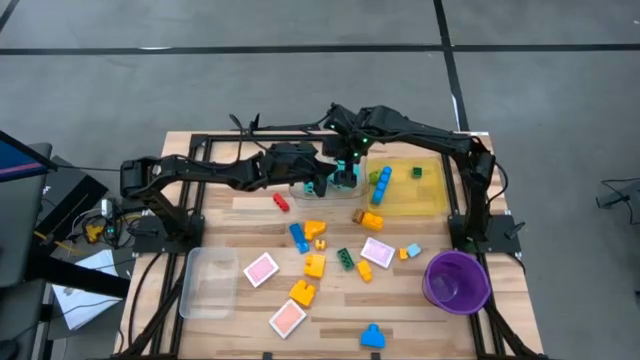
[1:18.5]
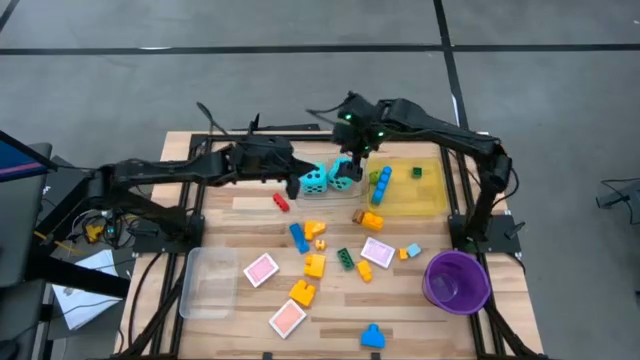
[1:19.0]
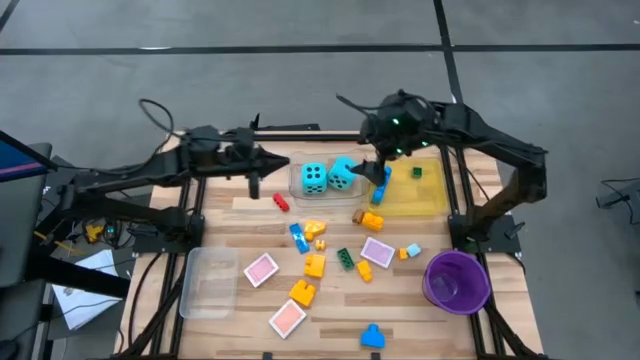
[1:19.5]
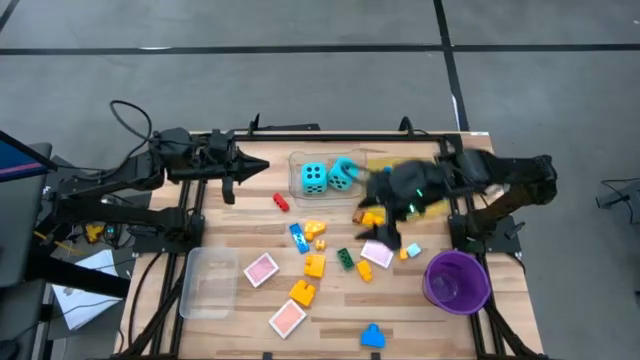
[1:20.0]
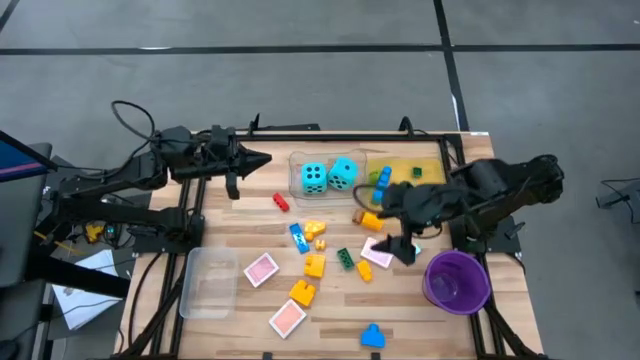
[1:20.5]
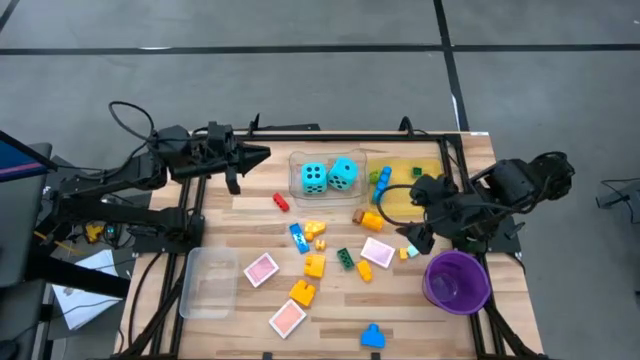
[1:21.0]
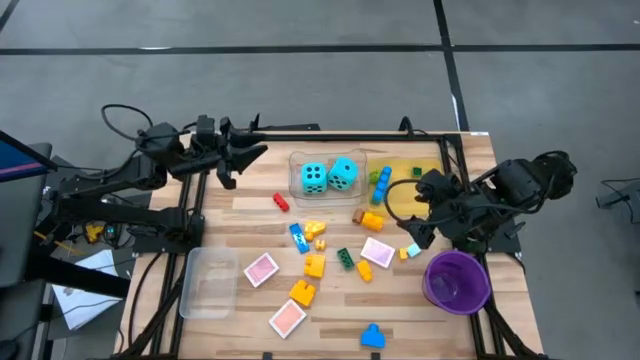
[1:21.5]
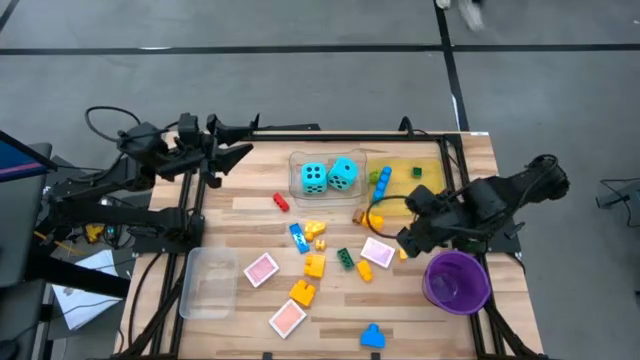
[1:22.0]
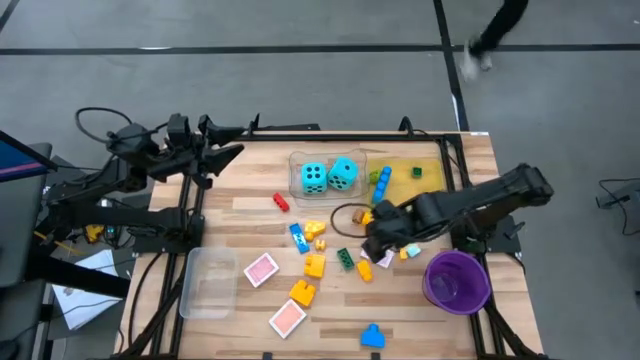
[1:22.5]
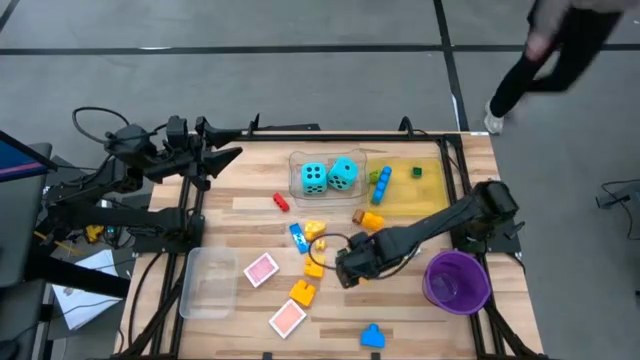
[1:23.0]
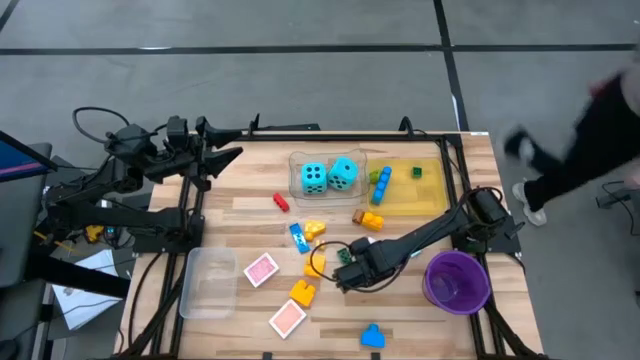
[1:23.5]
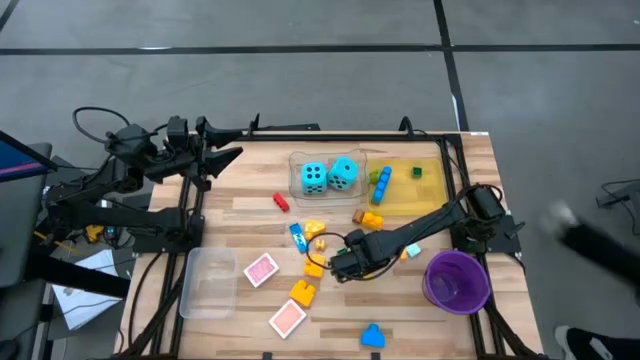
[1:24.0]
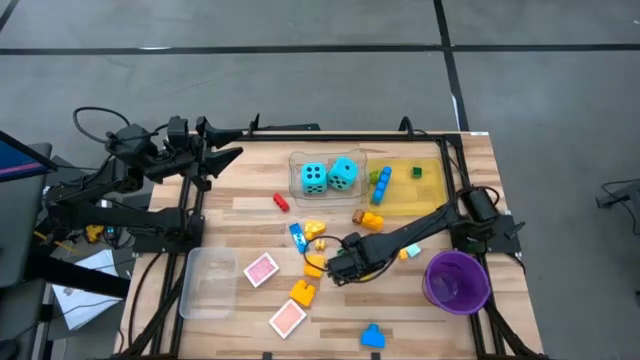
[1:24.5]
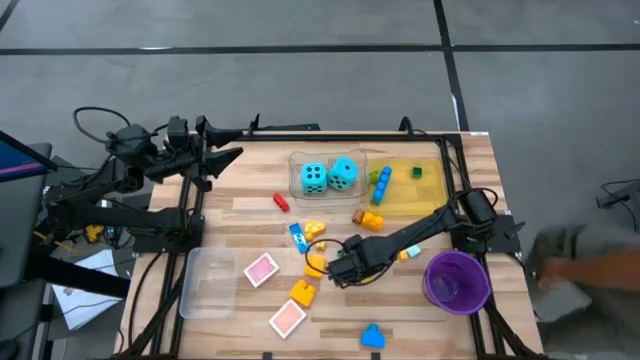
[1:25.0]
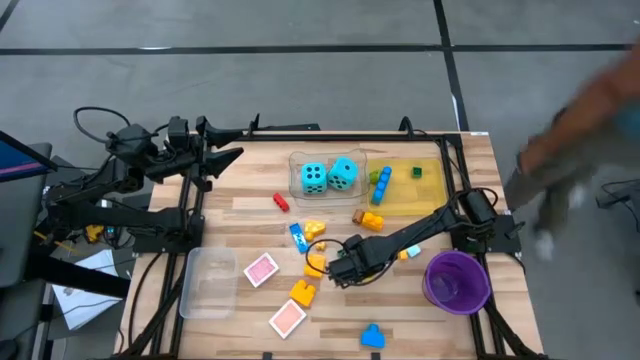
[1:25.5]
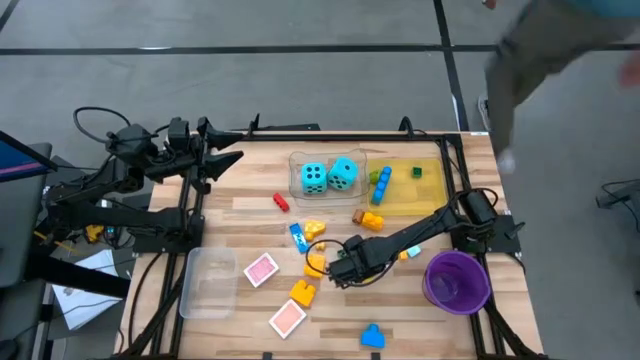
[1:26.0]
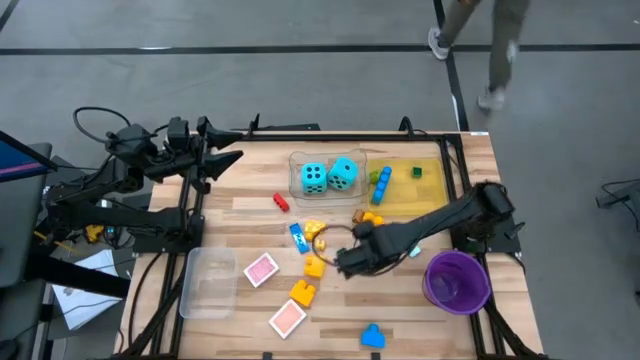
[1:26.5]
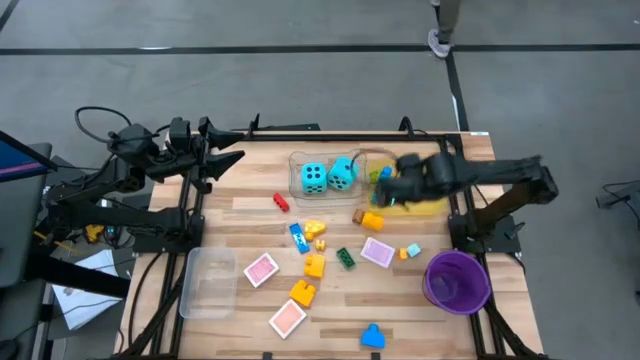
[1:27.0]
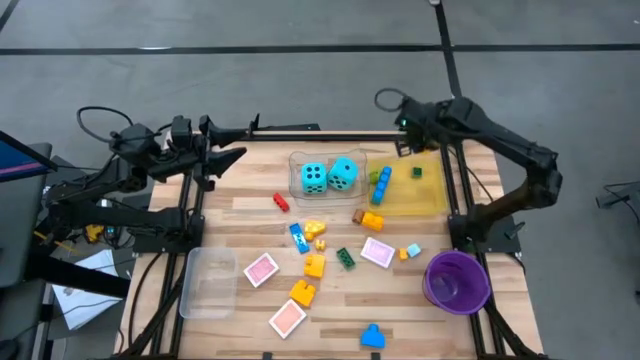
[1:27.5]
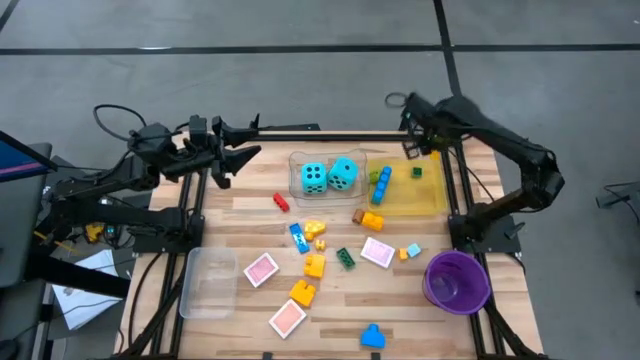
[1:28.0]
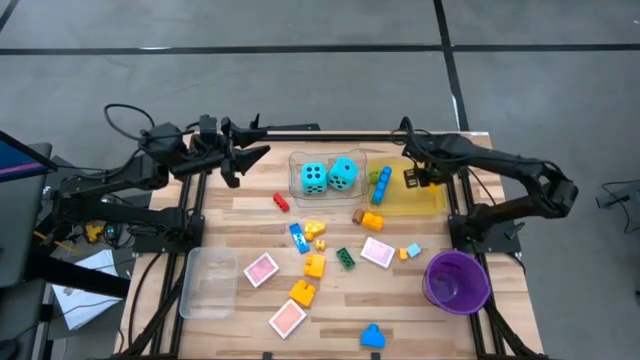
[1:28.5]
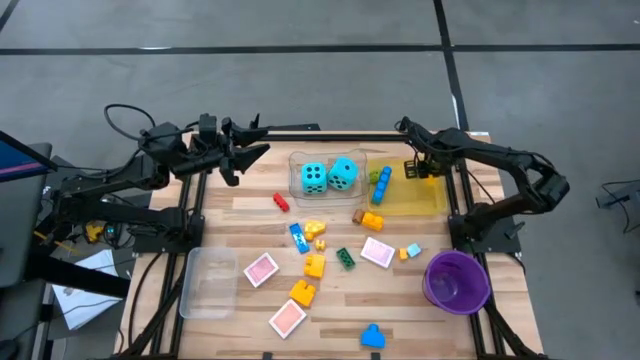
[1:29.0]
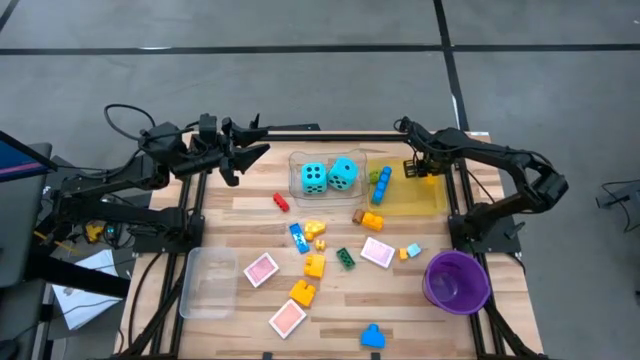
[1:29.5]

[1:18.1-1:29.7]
Task: Pick & Place Toys
Put the yellow game piece into the yellow bin

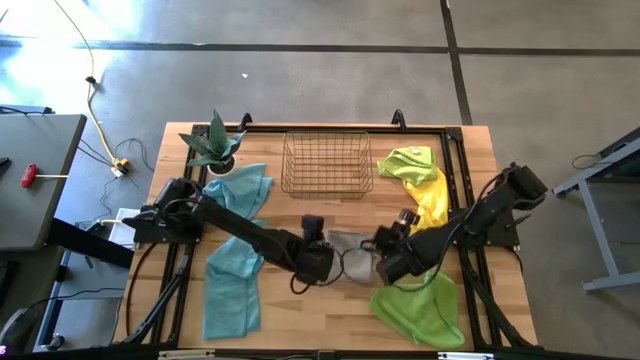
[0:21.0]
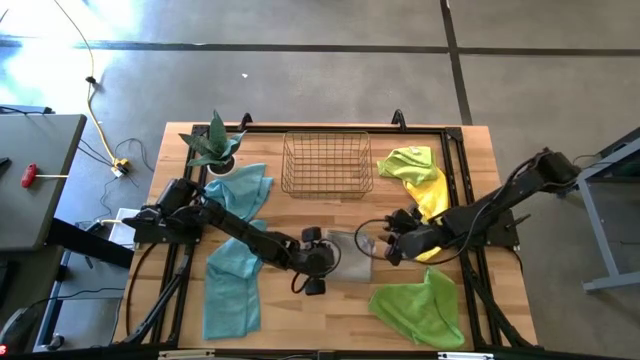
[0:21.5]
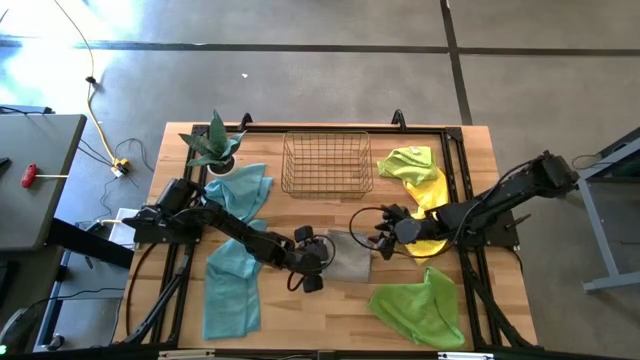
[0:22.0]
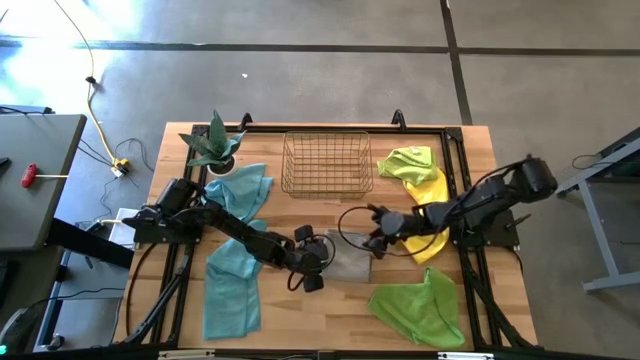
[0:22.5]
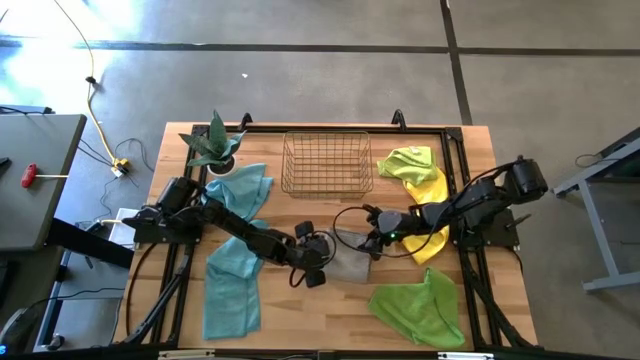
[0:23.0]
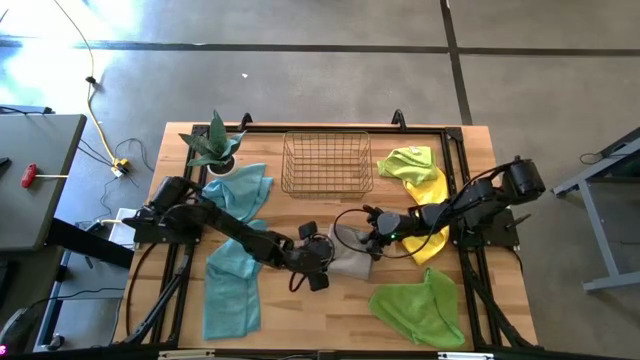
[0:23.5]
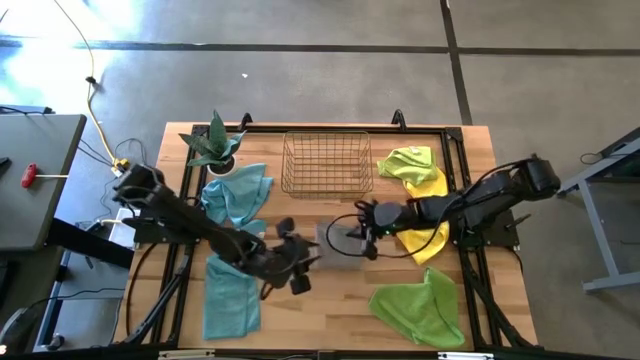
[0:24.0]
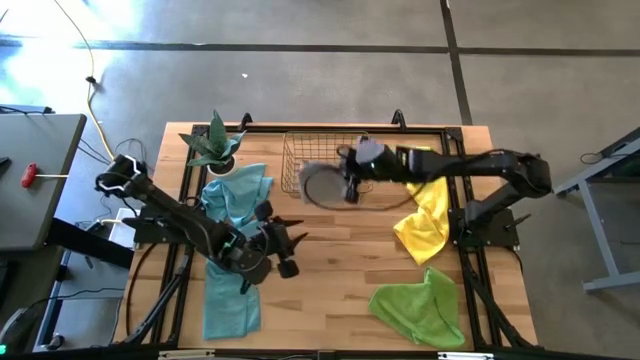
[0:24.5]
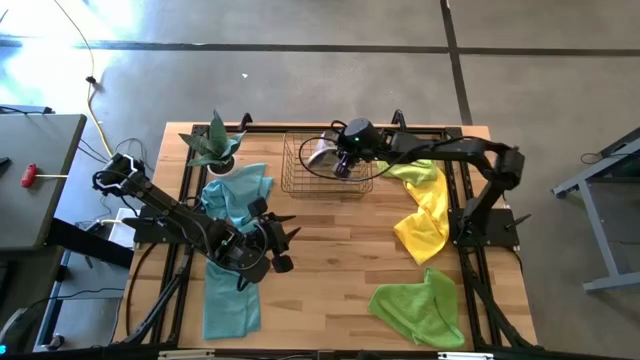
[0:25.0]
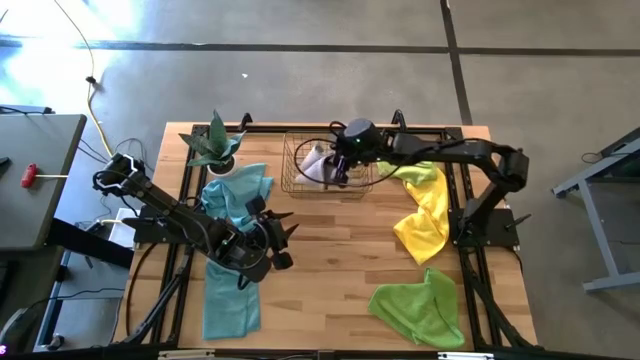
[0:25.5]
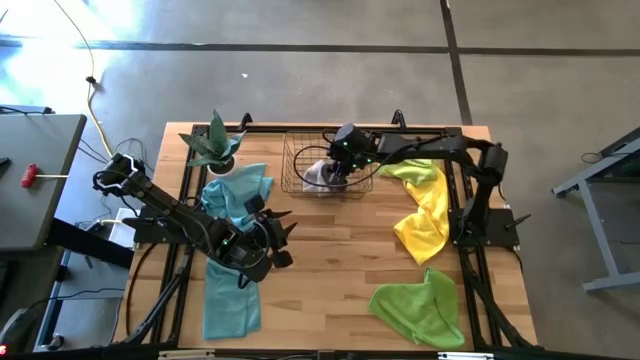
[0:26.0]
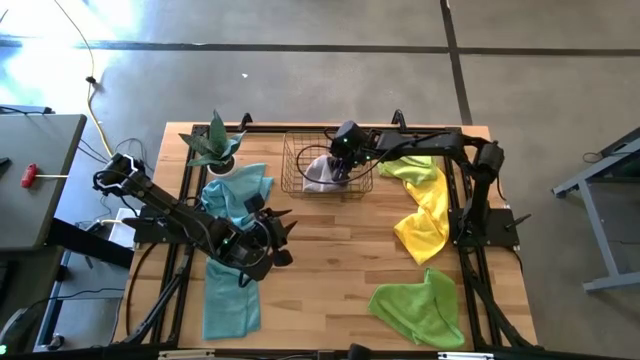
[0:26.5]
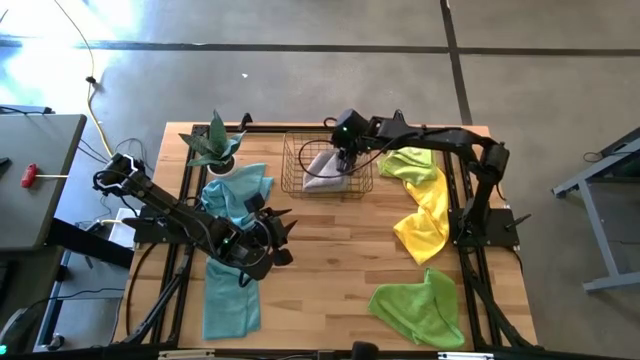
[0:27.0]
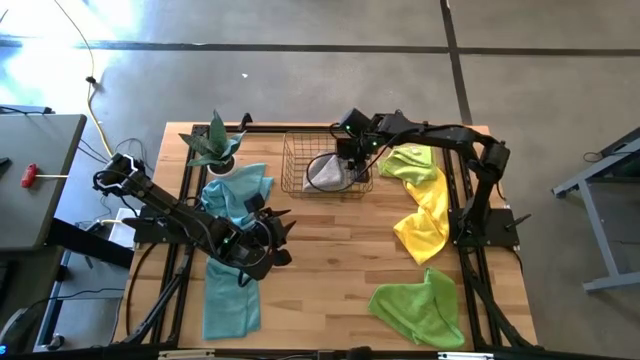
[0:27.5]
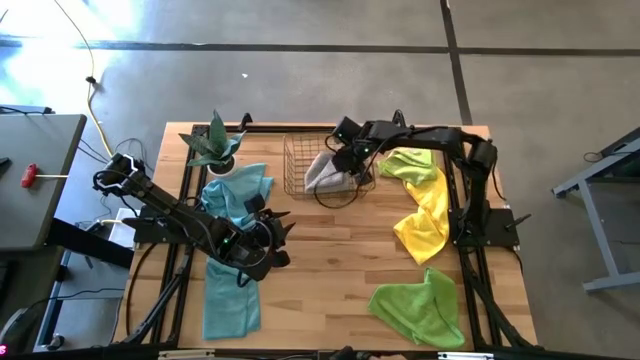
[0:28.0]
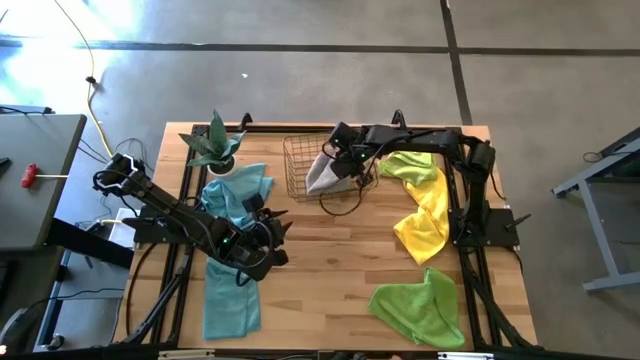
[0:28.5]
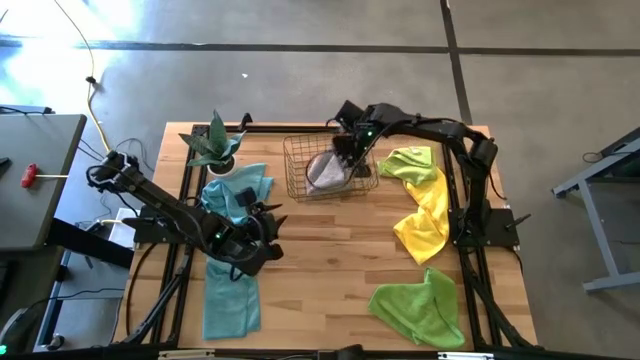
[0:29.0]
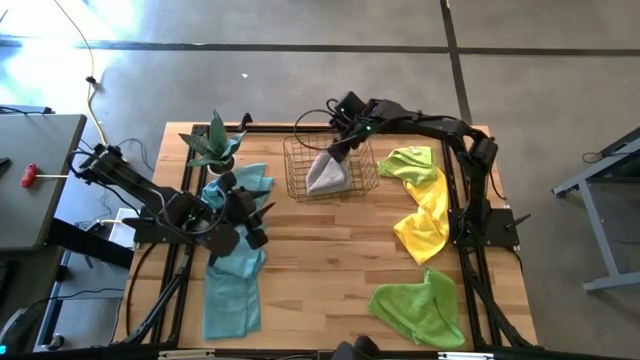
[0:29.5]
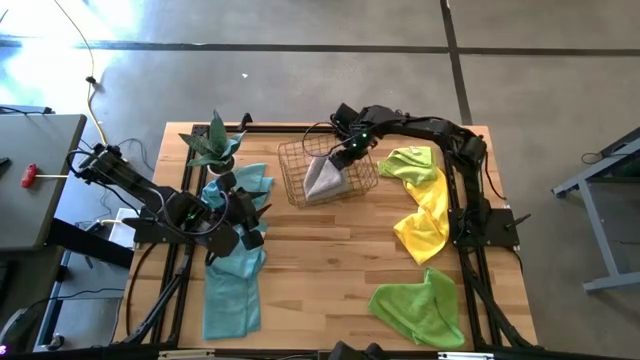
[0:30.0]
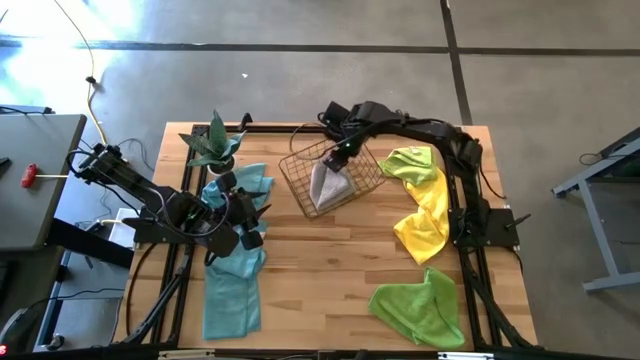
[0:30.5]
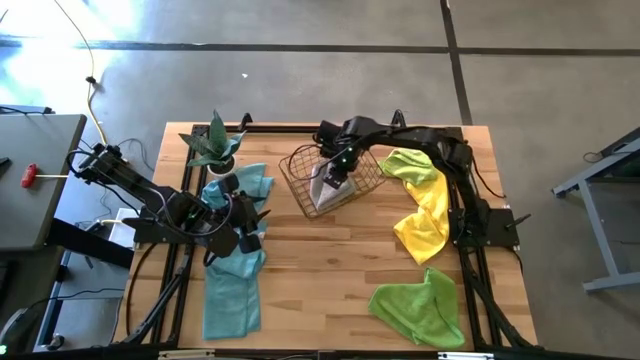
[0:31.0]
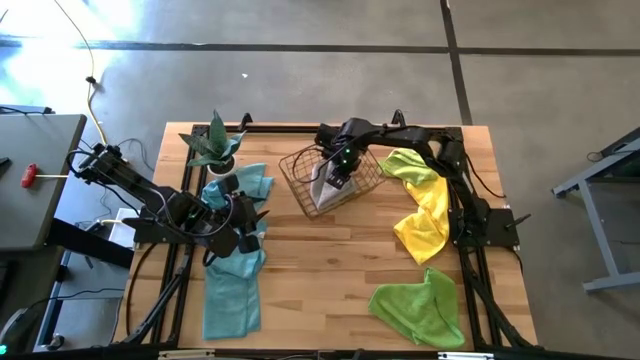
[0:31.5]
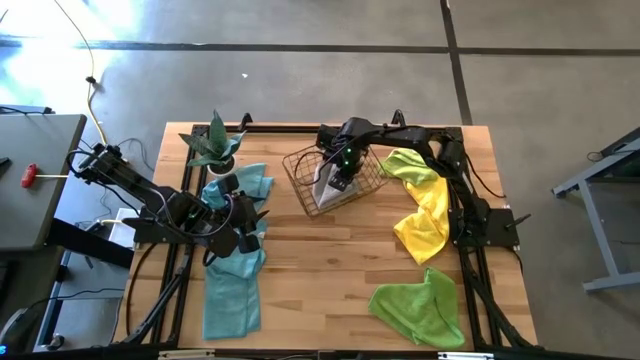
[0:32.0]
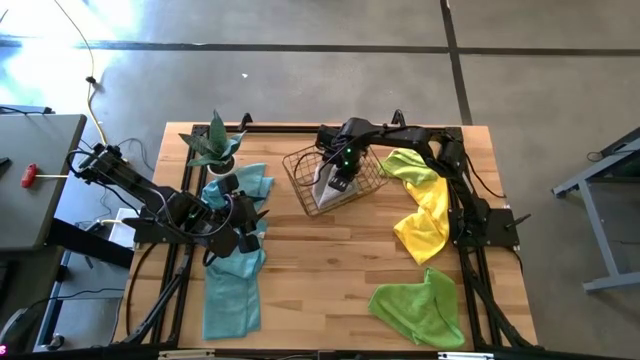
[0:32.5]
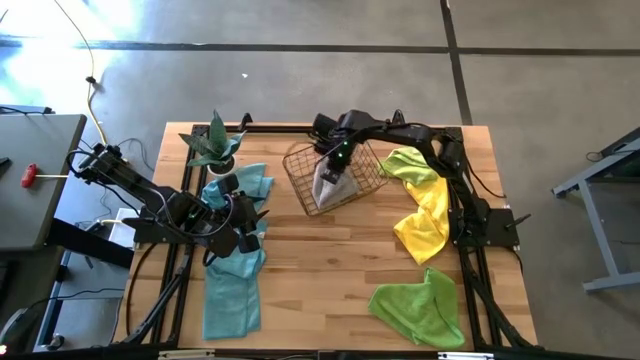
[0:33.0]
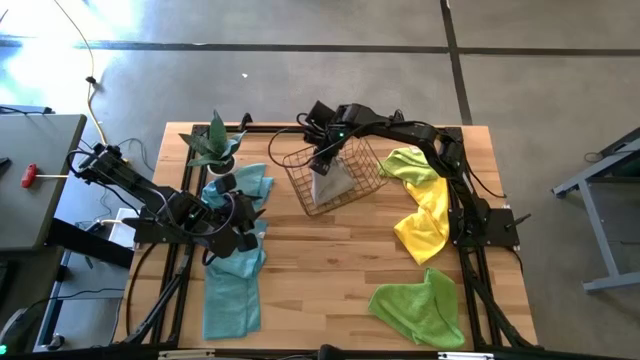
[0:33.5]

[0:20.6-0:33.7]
Task: Fold microfiber towels
Put the gray microfiber towel into the wire basket
